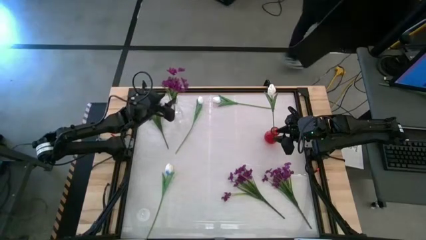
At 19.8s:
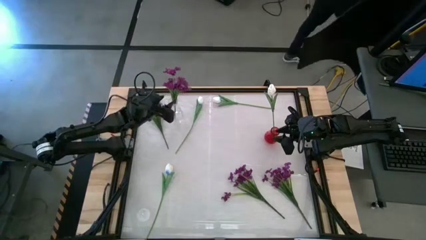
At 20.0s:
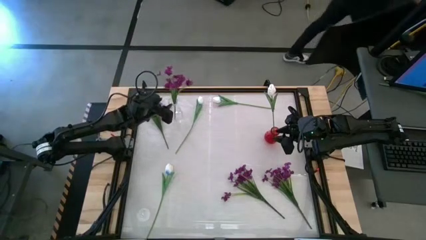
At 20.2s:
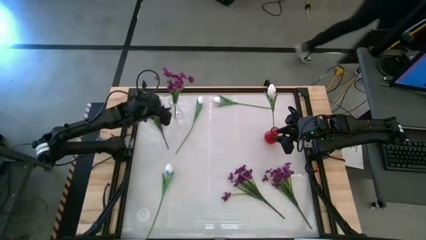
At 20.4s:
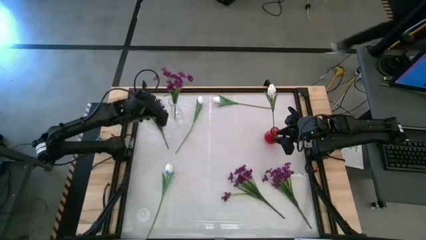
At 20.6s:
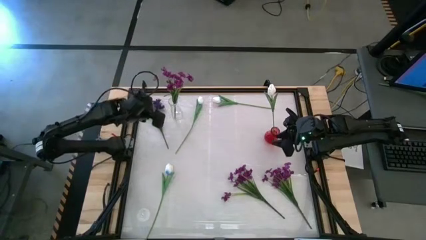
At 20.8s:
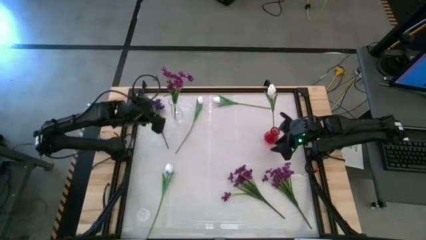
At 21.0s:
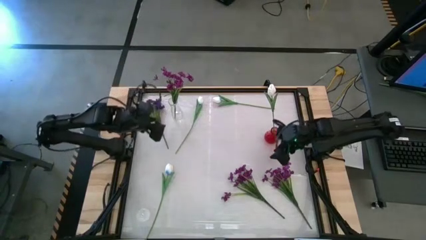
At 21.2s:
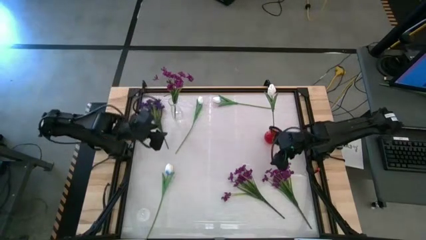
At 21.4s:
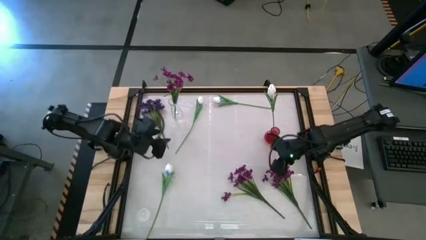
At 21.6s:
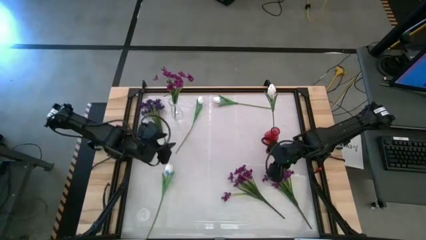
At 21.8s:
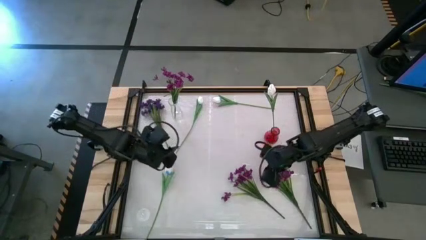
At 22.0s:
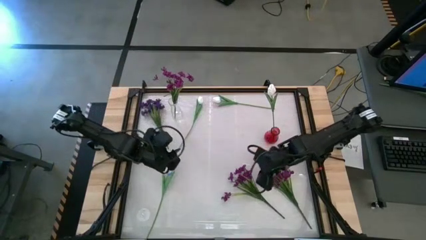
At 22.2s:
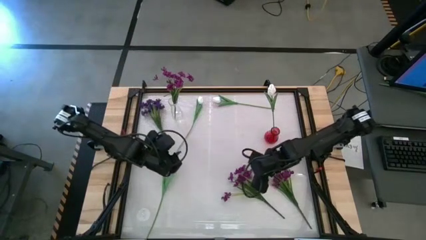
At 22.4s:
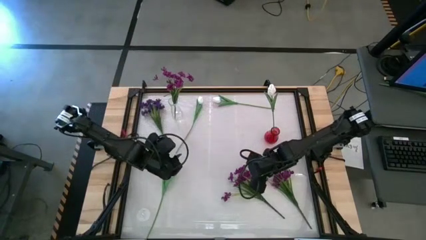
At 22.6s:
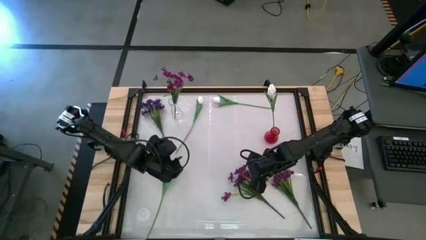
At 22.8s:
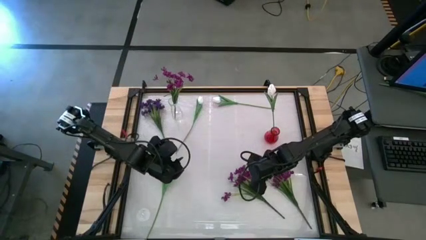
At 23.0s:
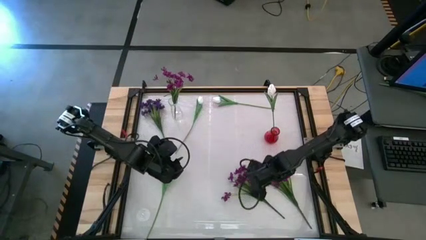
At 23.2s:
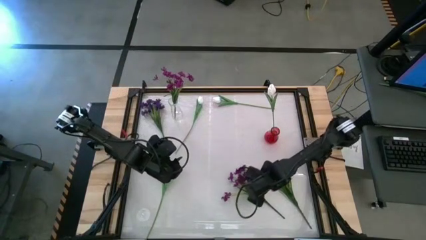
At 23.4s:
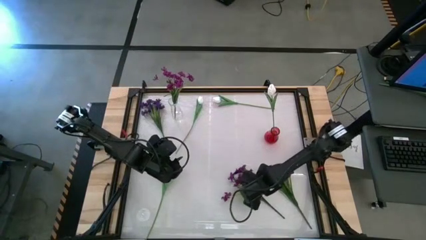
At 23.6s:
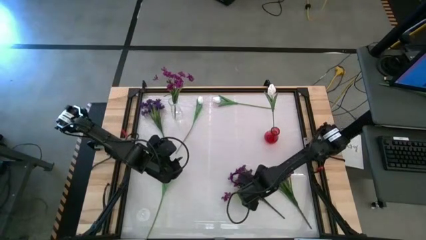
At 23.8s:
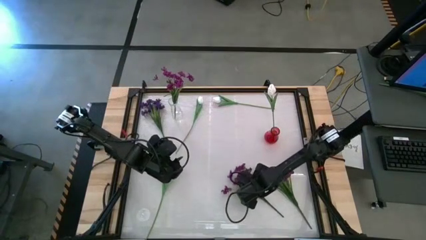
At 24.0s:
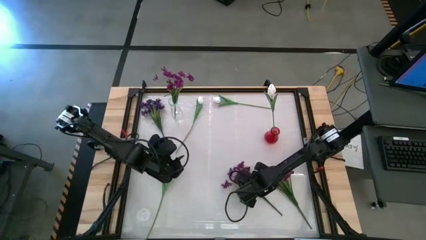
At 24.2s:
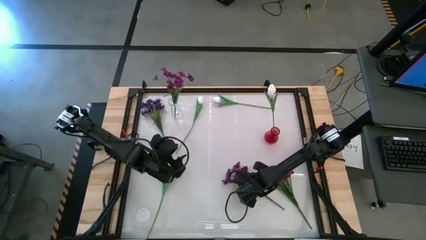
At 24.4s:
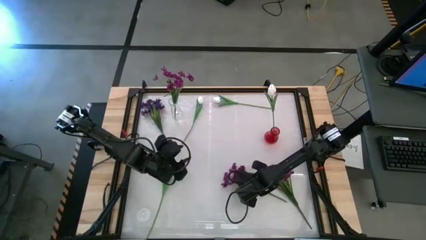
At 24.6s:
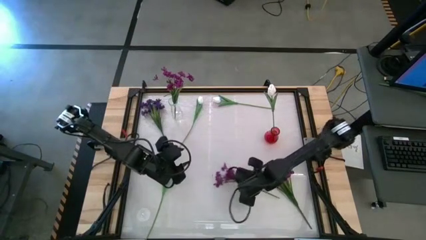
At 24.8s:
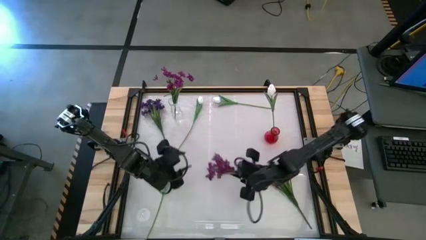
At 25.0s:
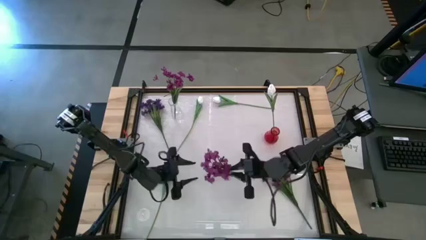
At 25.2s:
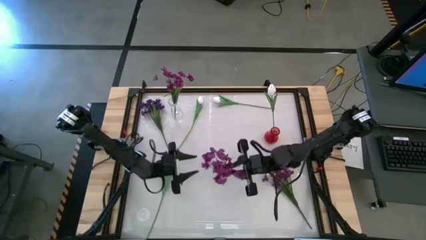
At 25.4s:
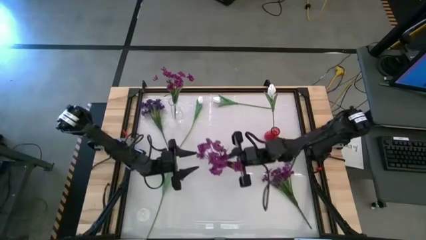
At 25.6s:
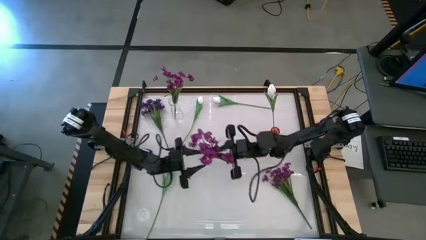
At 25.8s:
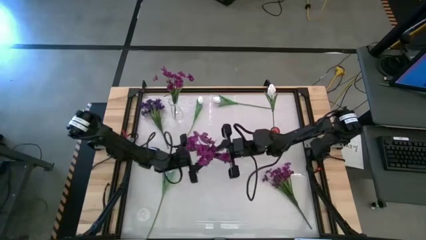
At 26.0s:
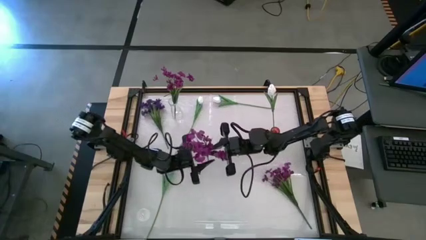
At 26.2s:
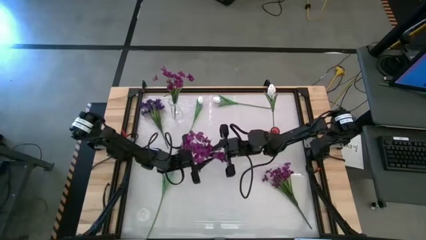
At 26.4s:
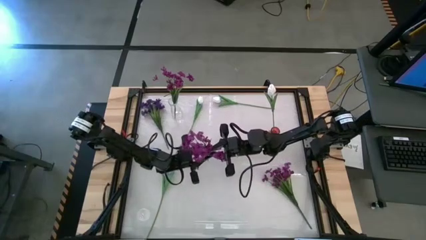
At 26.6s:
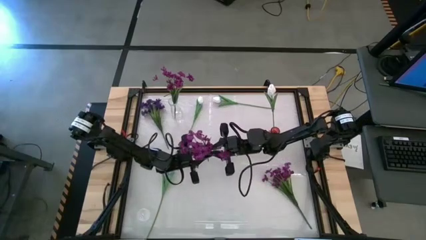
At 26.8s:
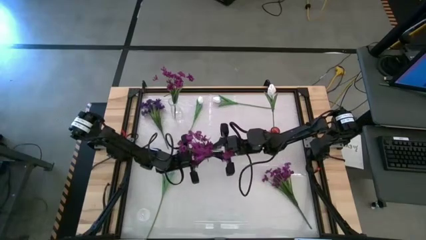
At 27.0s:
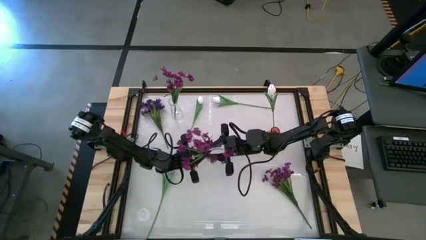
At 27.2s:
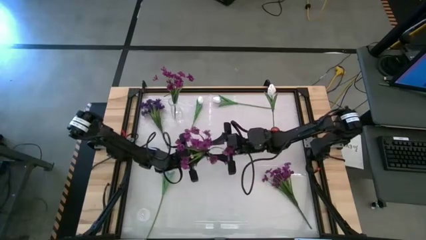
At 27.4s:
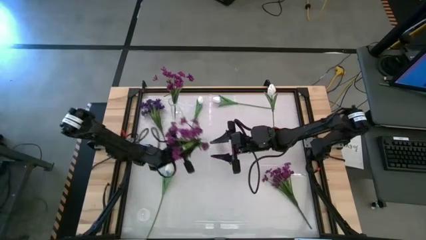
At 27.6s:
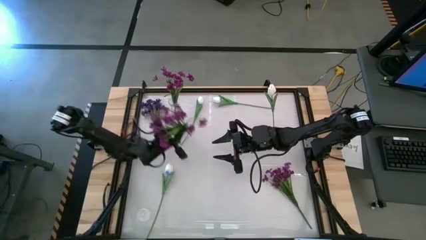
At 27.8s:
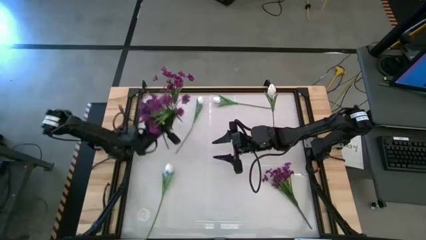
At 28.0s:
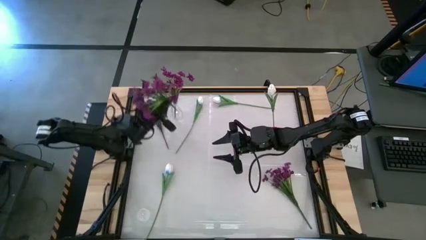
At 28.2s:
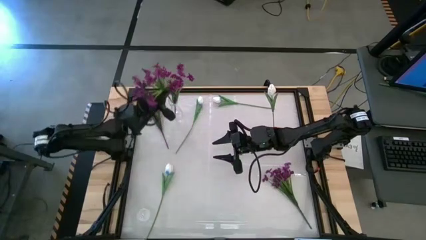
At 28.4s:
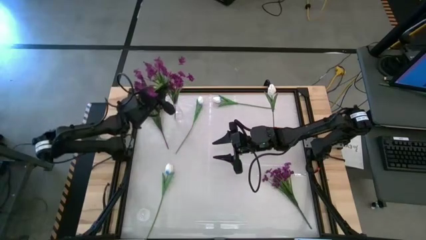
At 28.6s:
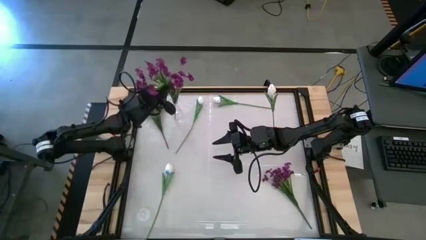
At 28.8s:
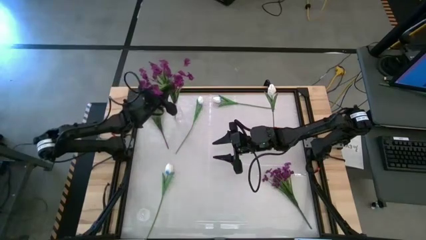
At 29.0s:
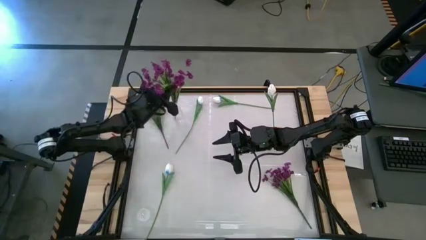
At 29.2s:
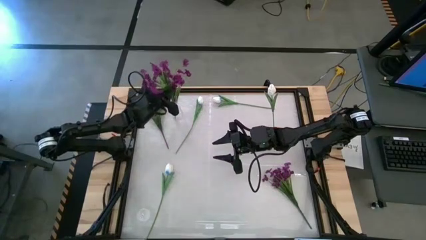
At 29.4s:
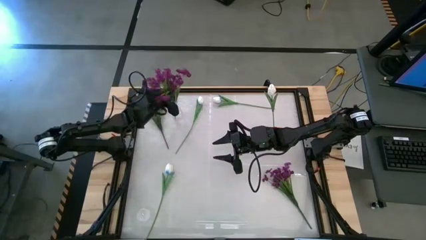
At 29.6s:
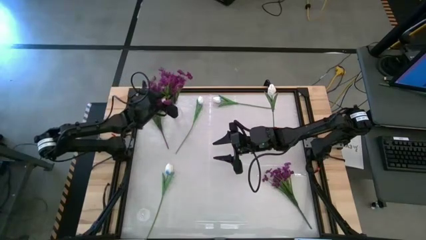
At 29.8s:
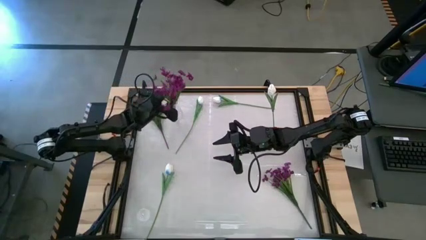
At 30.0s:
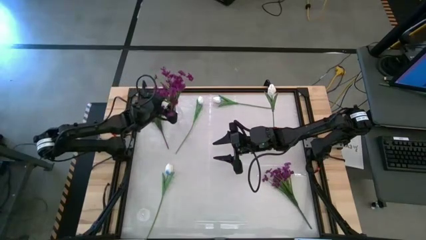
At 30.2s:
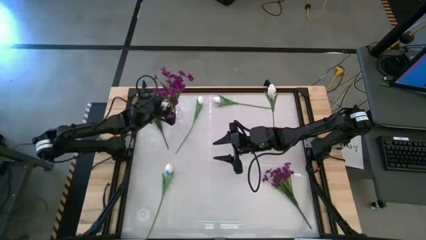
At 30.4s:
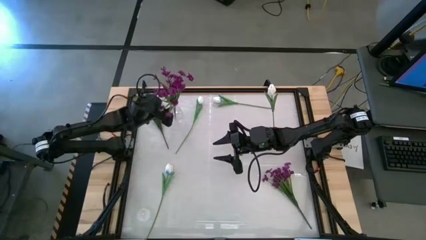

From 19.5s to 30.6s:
Task: Sort flowers into vase by color
Put the left violet flower into the transparent vase

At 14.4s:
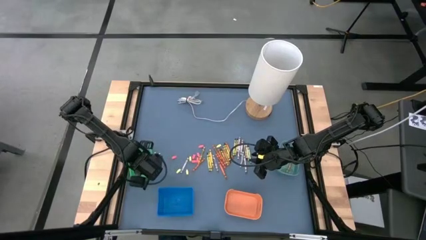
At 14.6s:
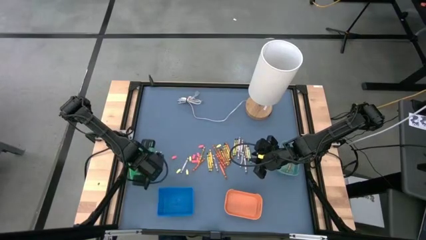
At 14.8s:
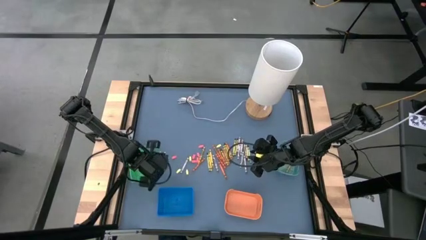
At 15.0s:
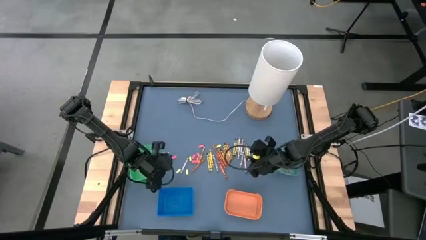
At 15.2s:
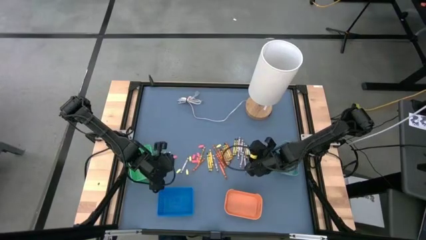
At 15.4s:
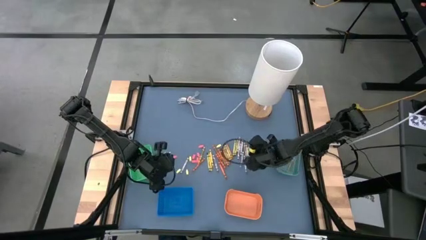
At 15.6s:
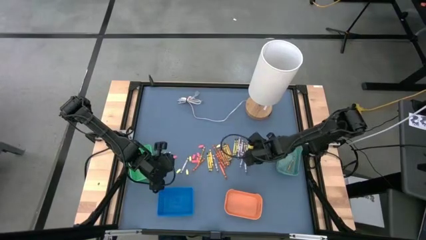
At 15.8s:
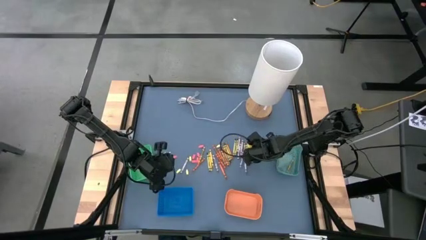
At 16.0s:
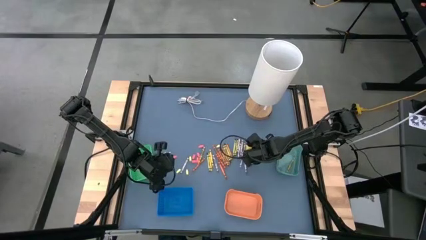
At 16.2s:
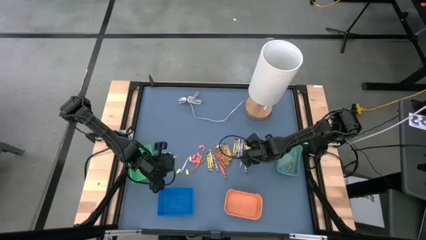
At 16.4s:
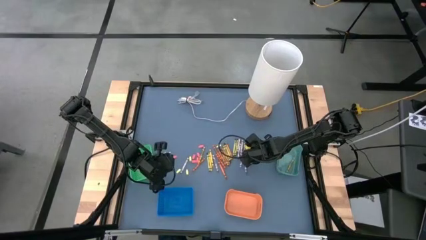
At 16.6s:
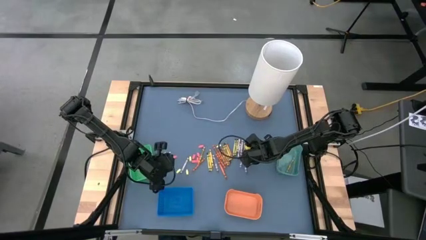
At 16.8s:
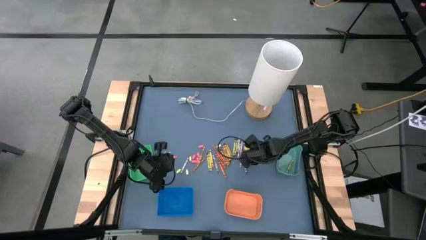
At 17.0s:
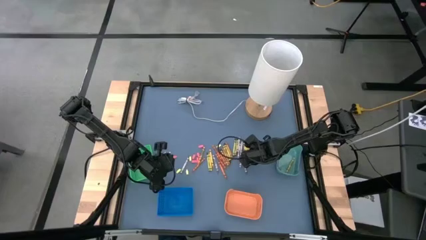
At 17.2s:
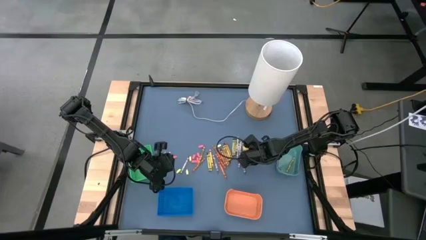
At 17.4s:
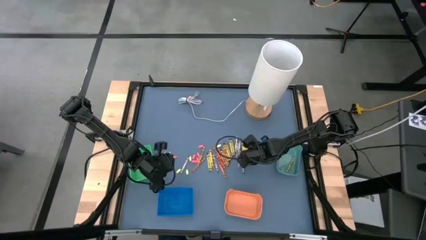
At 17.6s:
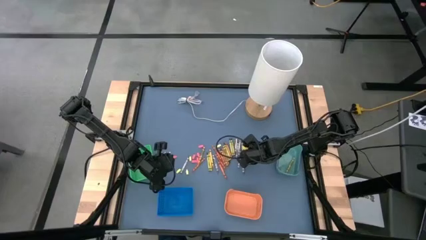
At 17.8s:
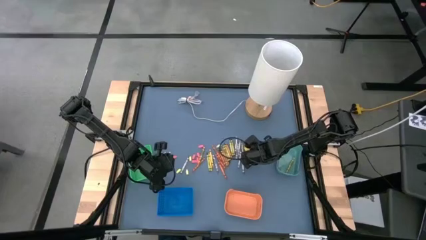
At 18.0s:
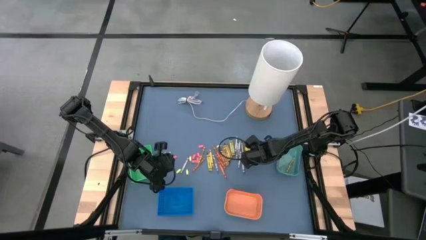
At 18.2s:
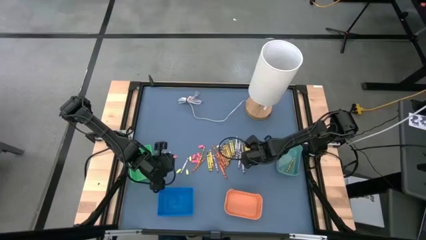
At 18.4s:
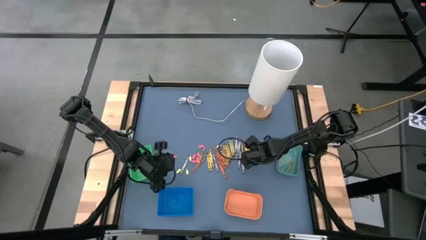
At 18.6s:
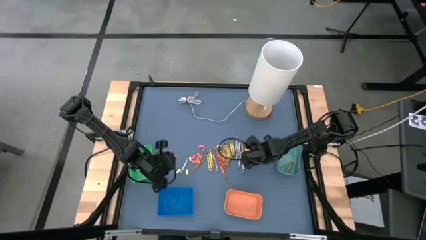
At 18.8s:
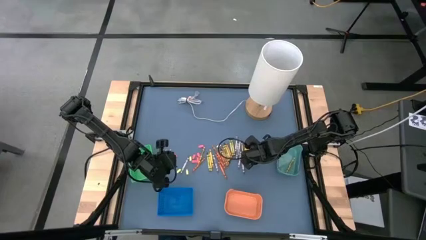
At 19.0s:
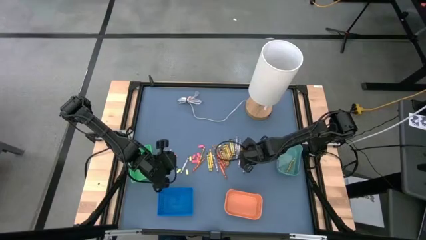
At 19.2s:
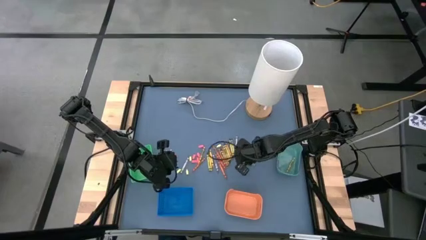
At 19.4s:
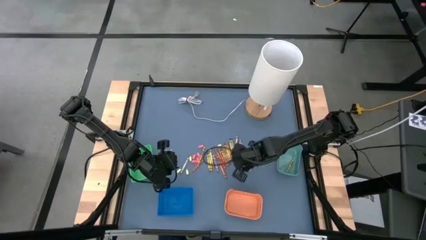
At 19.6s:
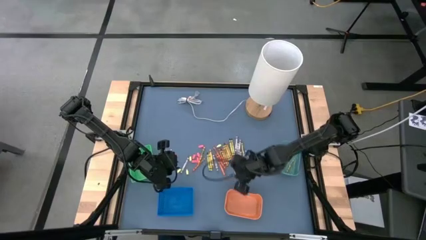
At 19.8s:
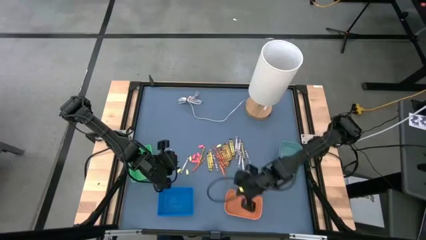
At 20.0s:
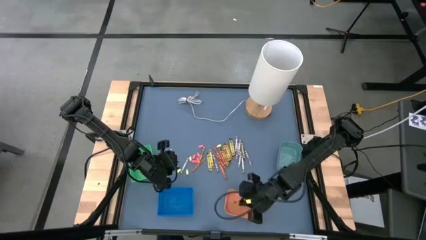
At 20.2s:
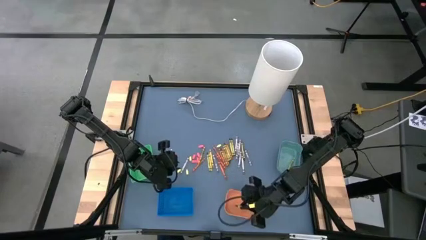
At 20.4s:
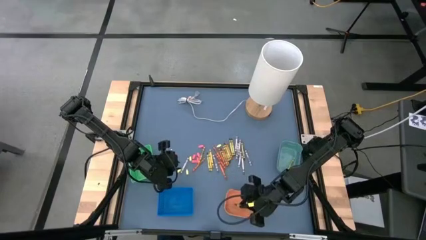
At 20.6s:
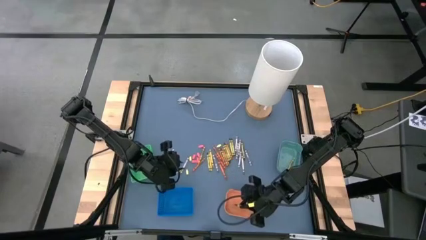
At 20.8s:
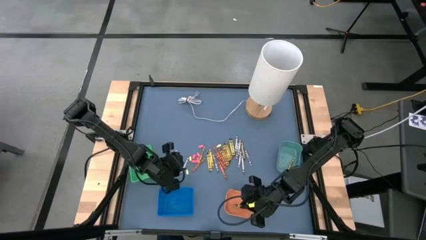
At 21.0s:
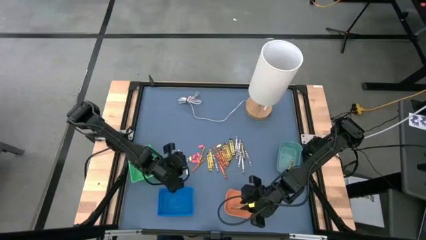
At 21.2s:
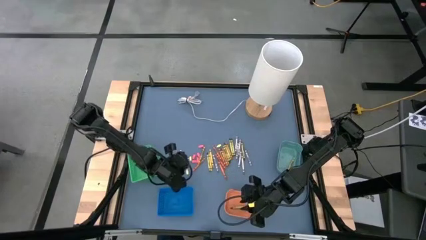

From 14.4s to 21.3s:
Task: Sort crayons
Put the green crayon into the orange bin
